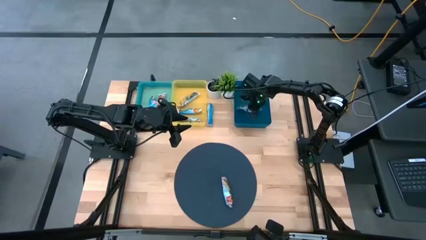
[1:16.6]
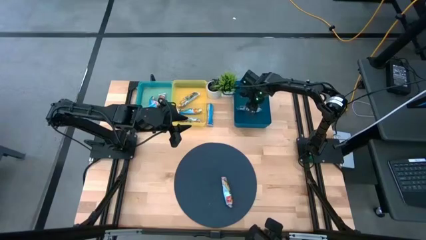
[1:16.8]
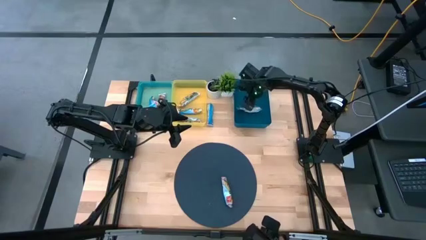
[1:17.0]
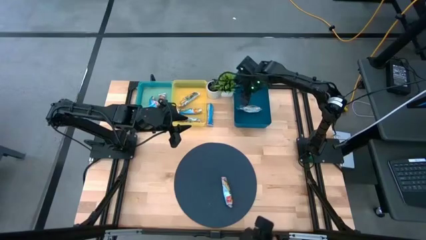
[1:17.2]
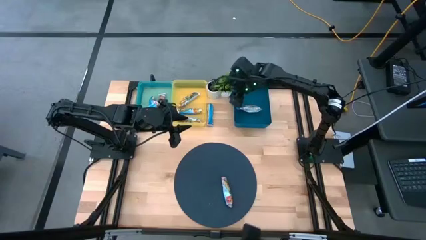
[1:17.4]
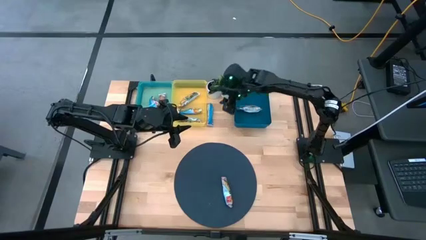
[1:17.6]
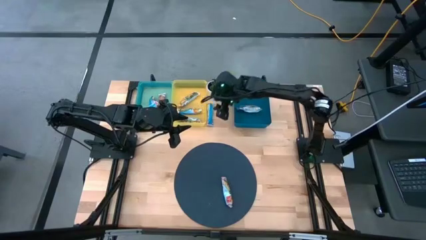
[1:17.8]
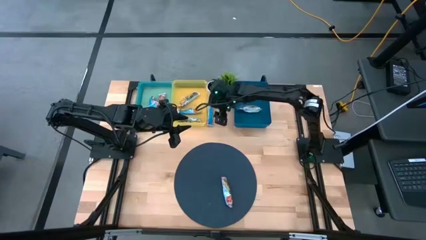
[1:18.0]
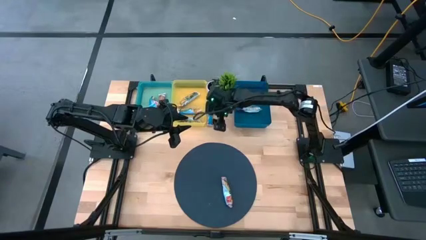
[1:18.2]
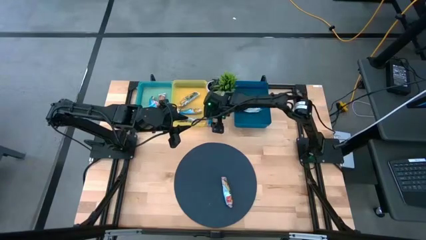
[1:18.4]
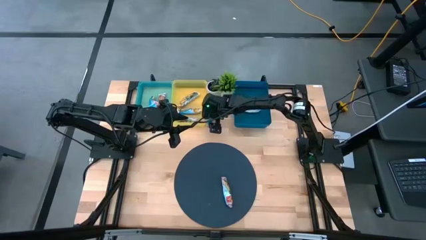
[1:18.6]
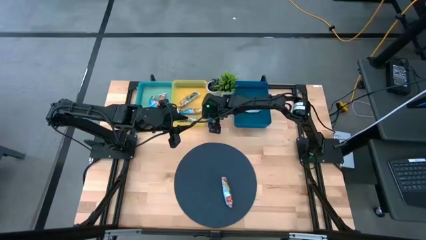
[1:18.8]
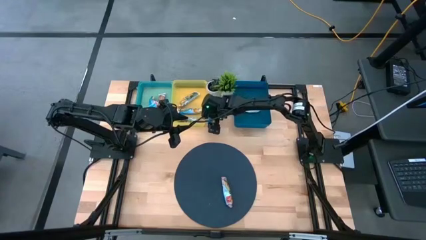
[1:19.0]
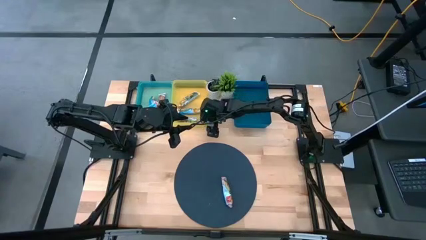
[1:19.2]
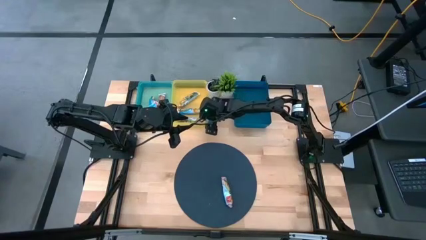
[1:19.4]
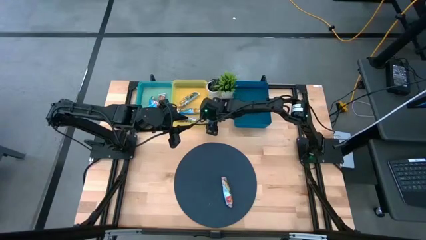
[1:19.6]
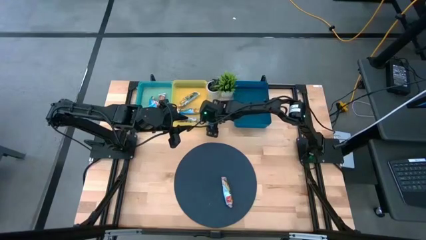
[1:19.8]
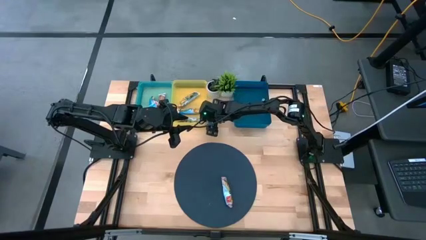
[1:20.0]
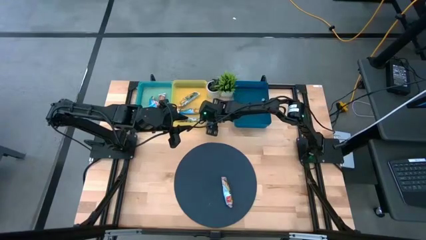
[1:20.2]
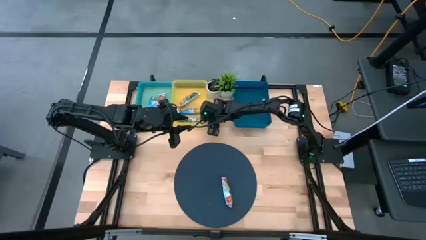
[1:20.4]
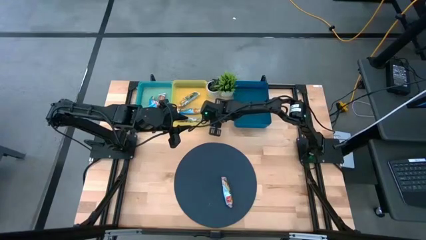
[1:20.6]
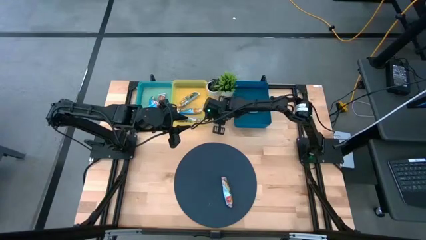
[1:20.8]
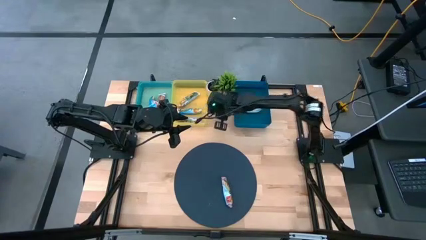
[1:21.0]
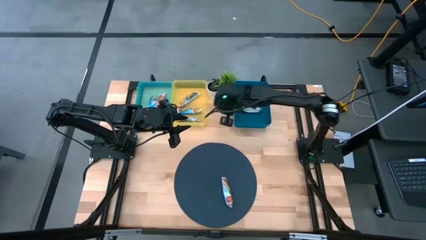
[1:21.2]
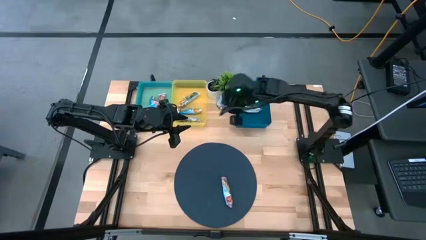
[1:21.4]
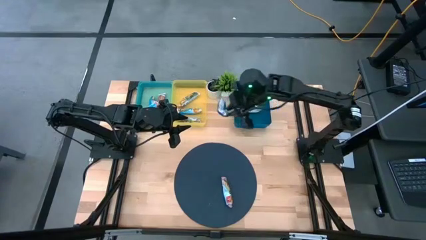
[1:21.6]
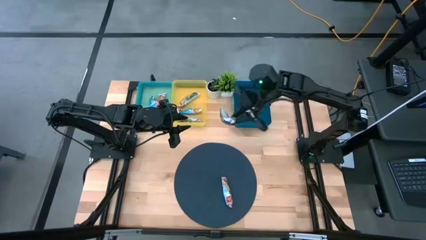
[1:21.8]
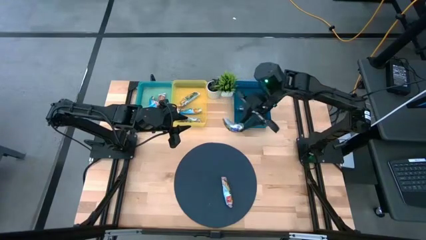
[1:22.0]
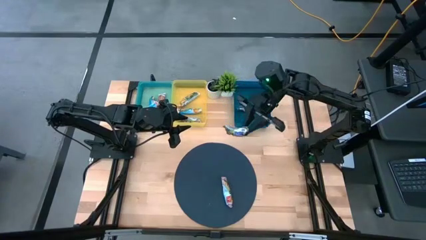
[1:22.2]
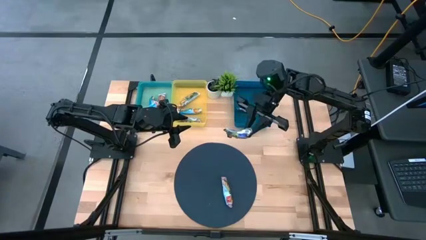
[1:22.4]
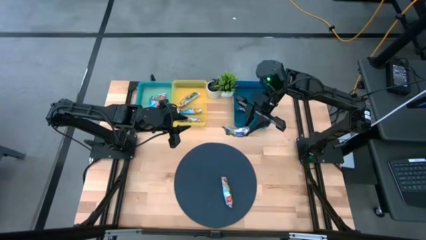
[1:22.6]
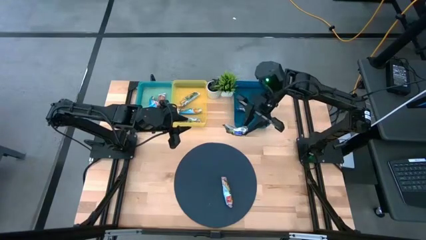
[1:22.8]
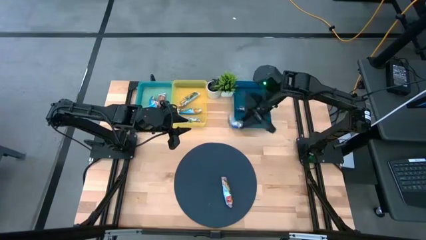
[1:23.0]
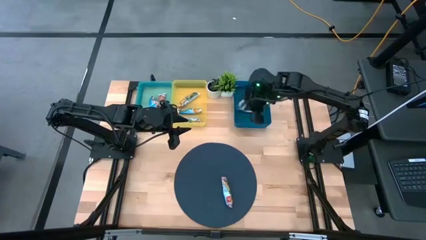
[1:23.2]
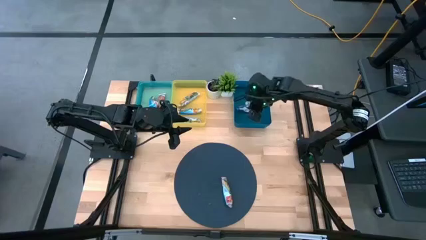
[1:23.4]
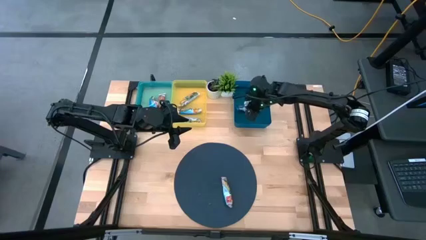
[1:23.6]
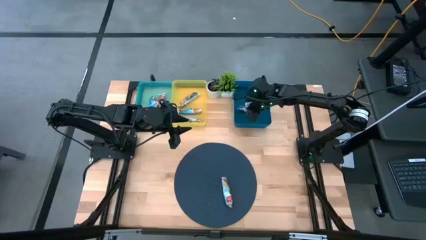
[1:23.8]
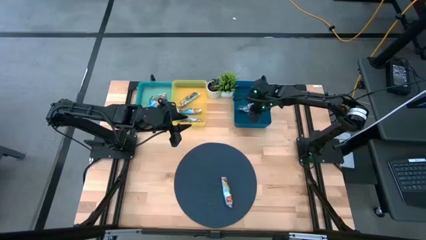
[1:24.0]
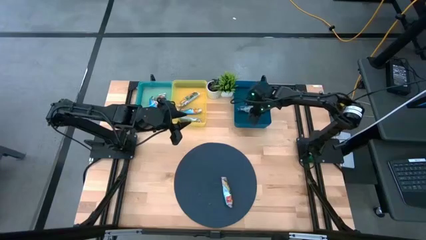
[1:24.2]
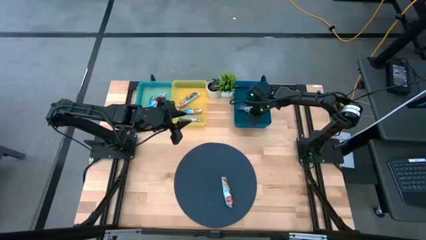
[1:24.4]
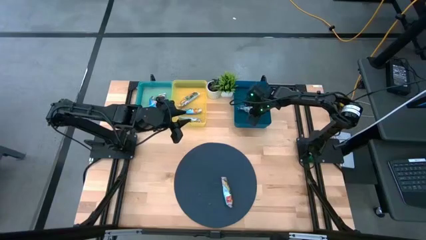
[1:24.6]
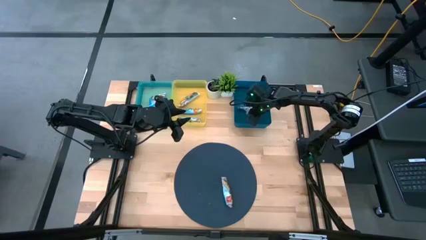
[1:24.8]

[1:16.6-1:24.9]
Task: Pick and place Granola Bars by type
Put the blue granola bar into the blue bin

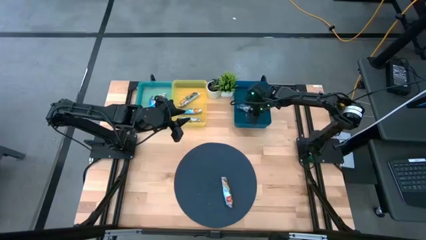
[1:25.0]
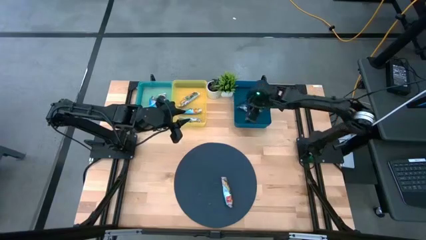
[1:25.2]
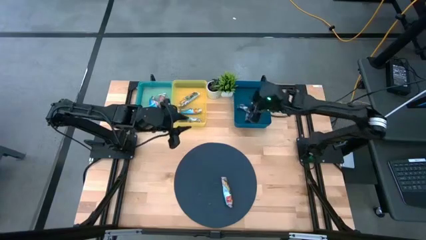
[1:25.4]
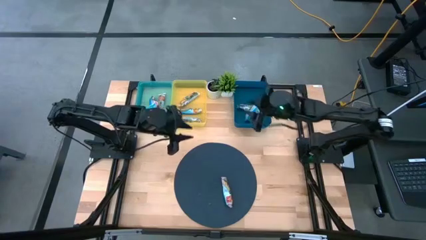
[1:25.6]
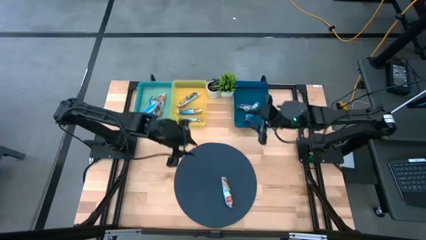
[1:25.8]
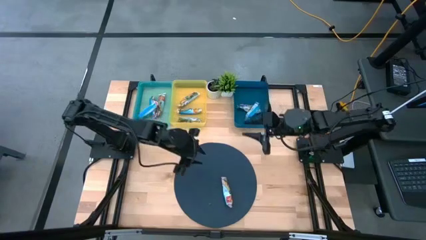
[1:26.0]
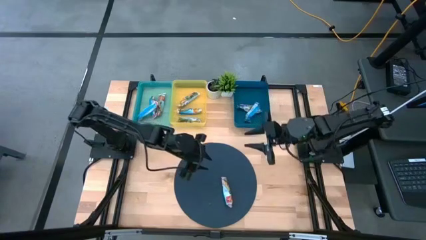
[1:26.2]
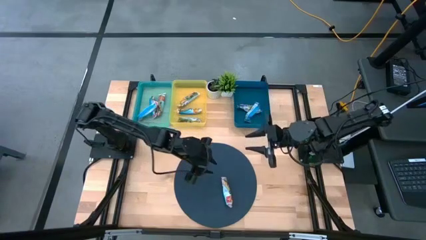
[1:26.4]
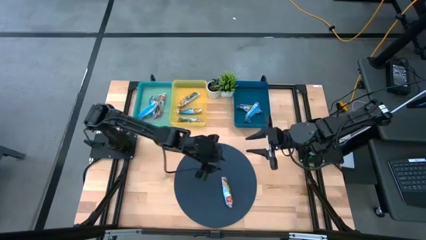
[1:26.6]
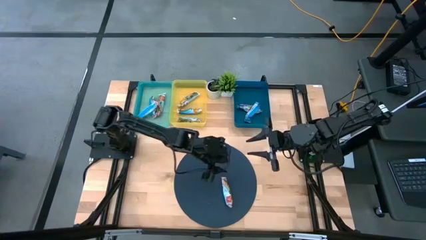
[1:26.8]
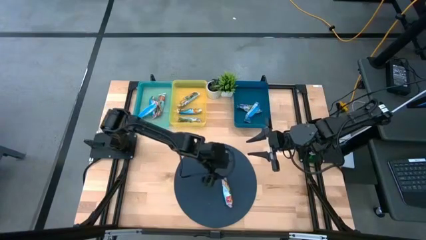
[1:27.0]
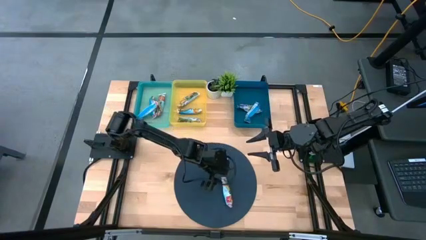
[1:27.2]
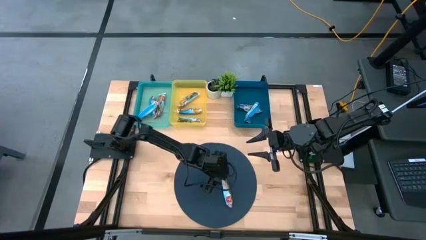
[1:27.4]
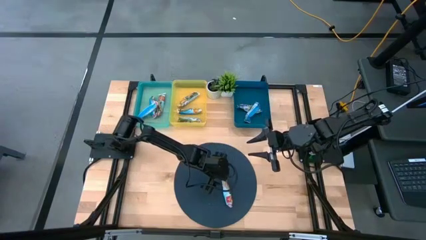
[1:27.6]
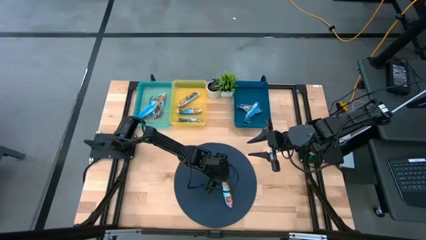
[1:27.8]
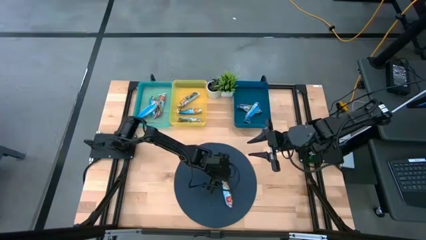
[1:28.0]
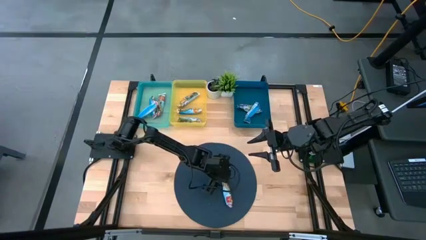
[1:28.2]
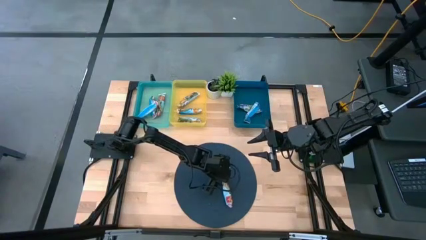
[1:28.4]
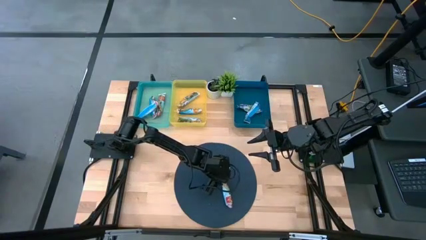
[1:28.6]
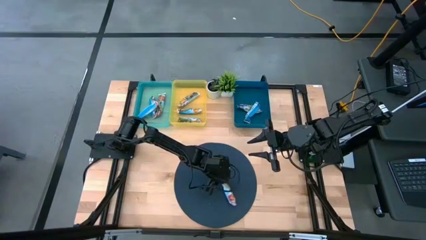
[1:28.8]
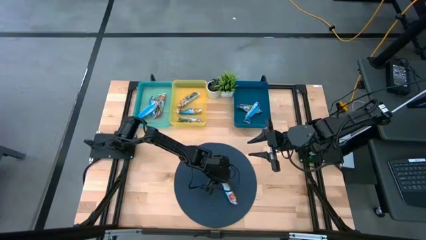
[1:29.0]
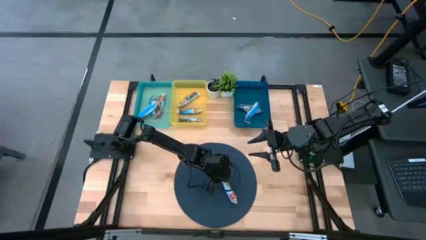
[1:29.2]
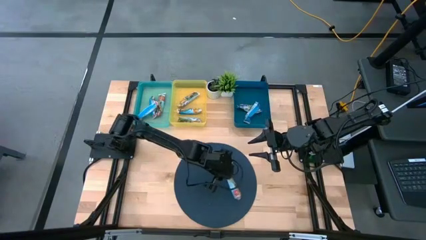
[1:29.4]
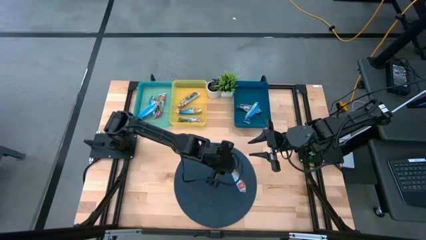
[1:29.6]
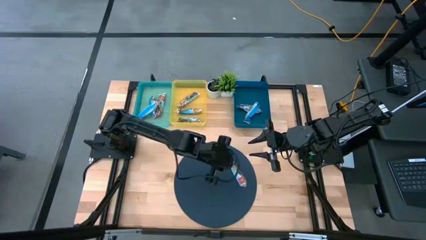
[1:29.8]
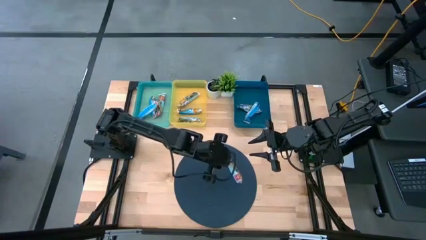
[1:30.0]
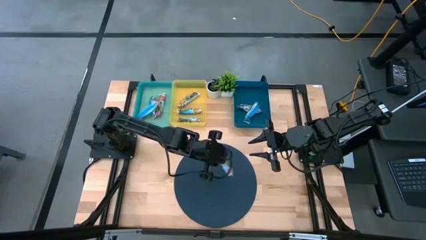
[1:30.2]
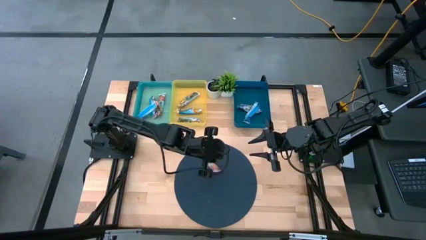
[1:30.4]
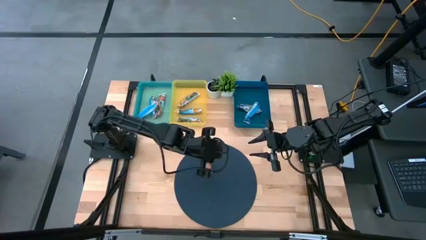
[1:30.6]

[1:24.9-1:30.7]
Put the red granola bar into the green bin
